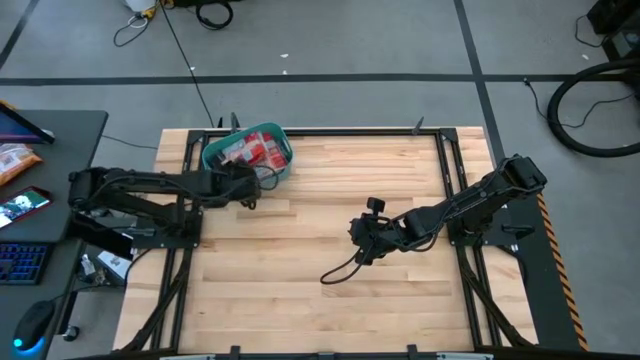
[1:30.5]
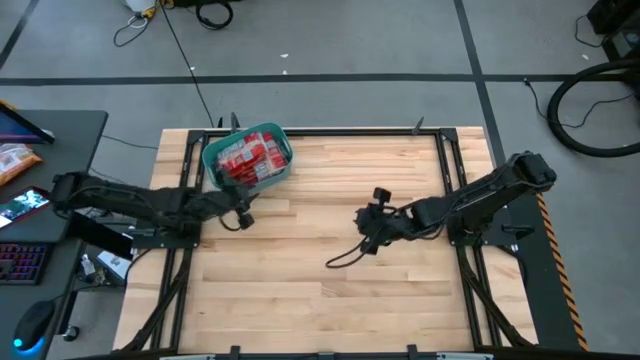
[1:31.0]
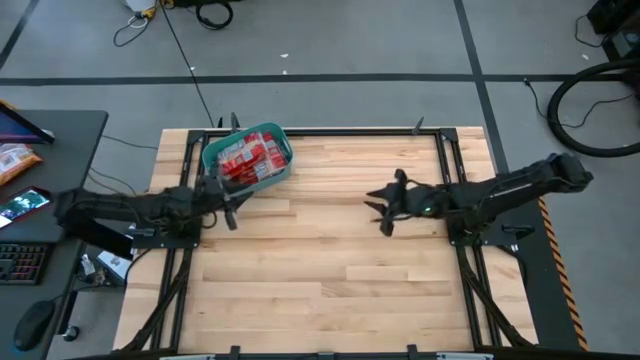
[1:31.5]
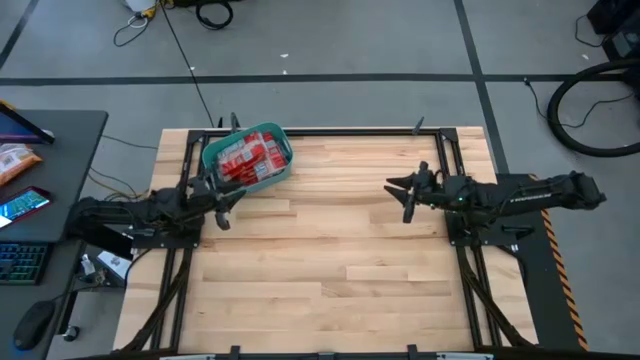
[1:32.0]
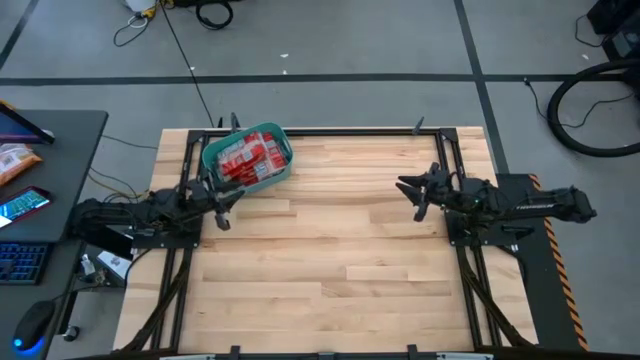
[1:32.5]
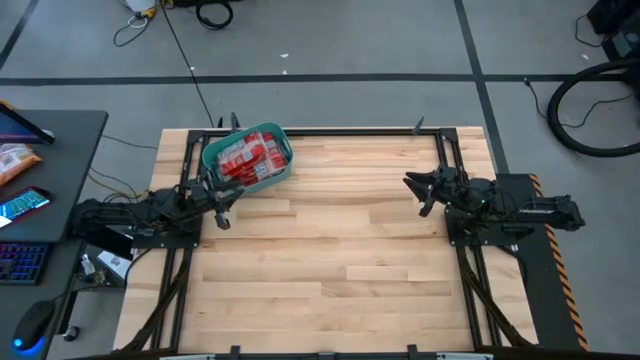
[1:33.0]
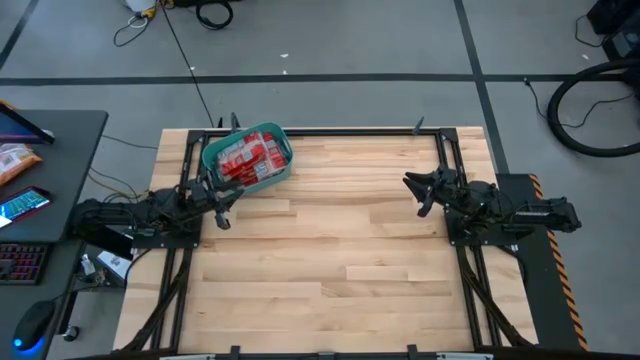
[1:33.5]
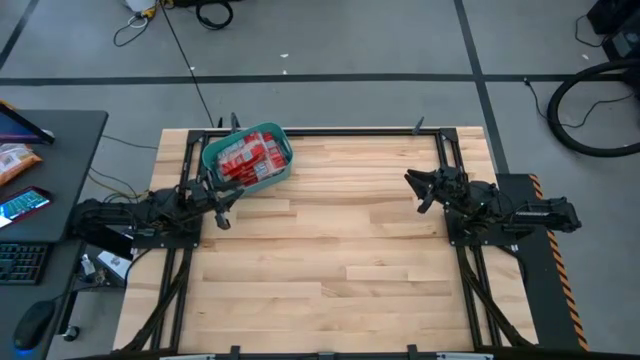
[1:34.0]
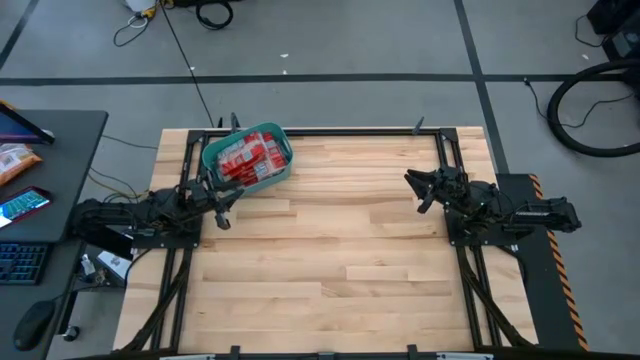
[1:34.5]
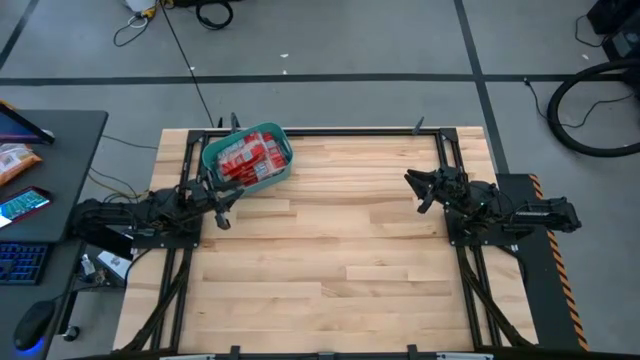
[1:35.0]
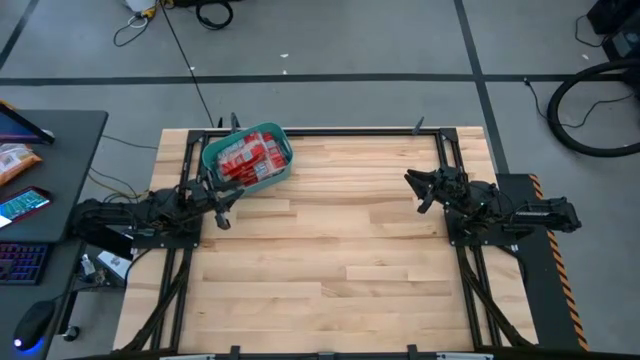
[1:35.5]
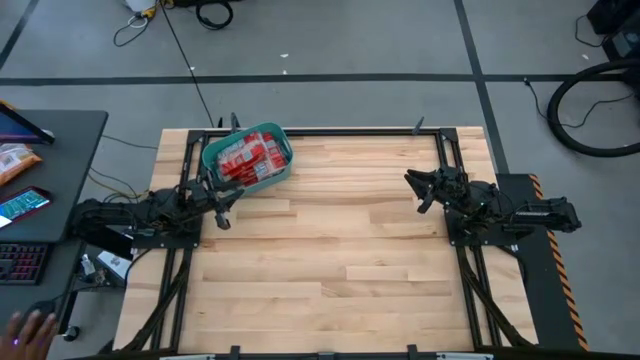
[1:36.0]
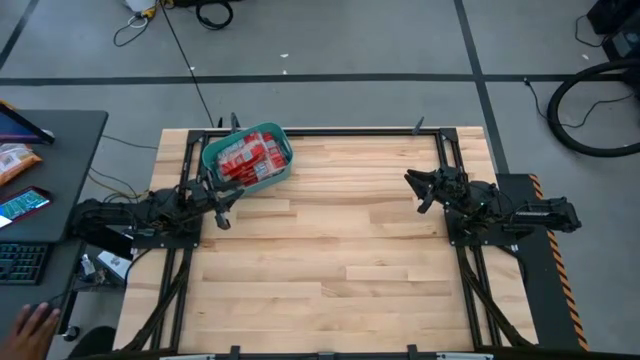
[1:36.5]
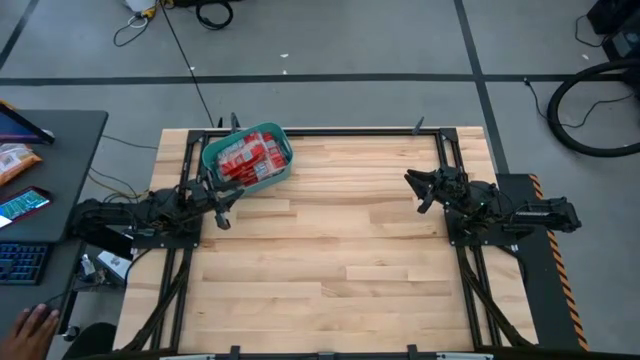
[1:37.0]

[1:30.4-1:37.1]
Task: Sort popcorn bags into baskets
Return to Home Position

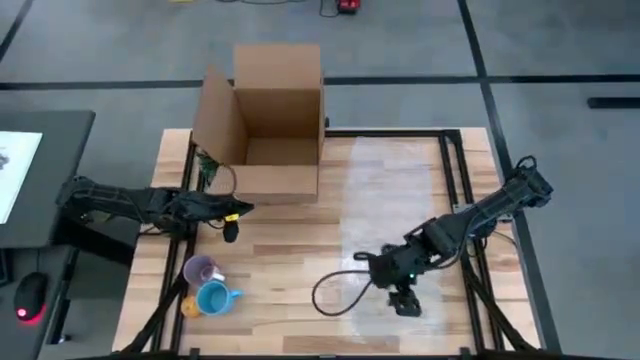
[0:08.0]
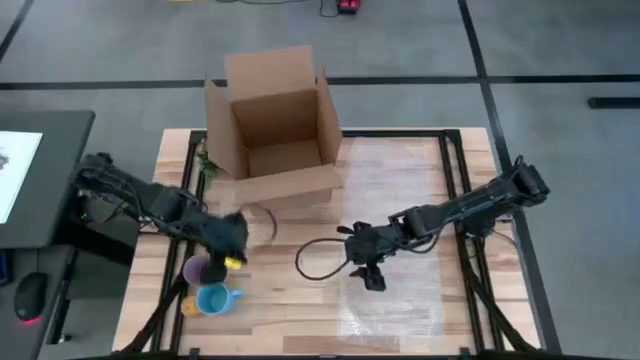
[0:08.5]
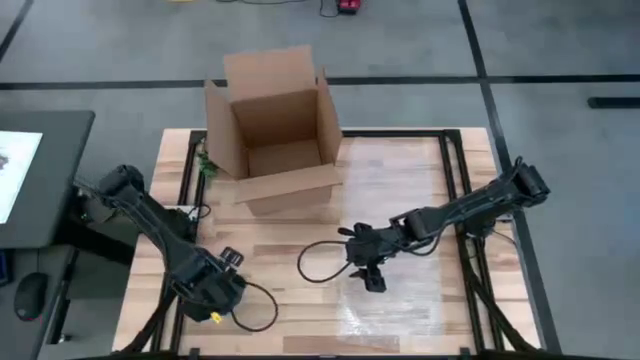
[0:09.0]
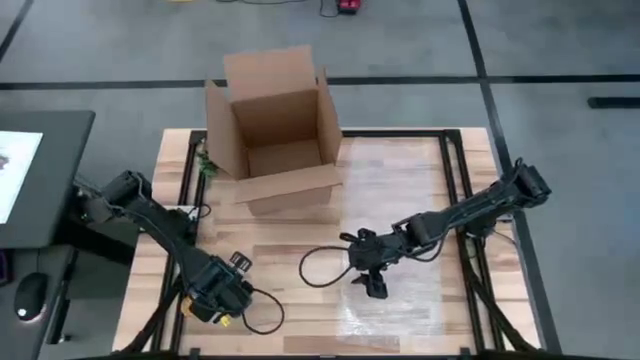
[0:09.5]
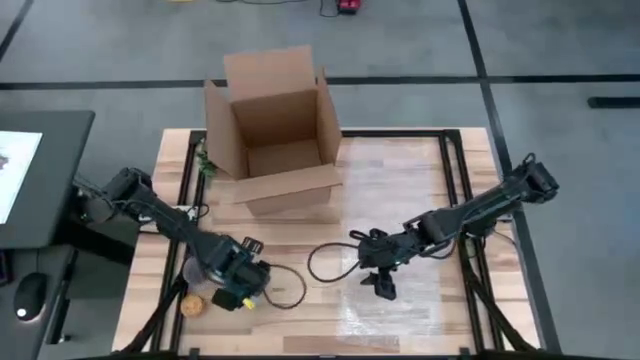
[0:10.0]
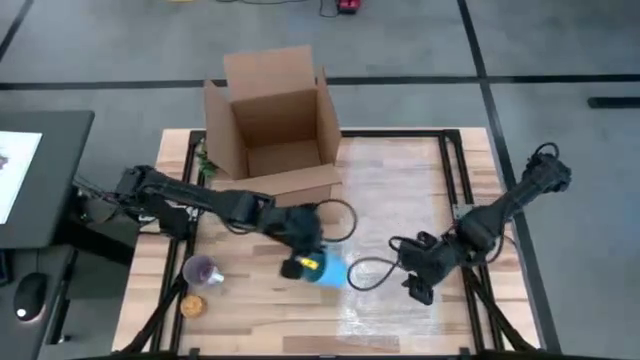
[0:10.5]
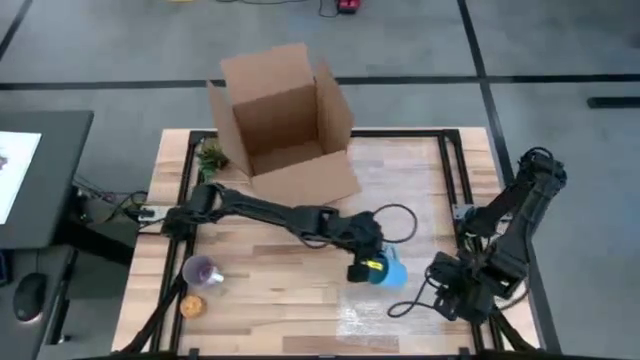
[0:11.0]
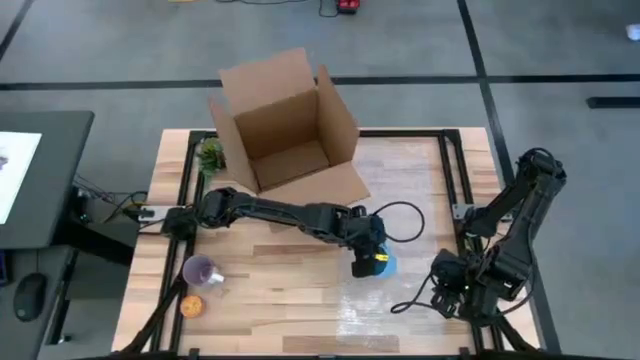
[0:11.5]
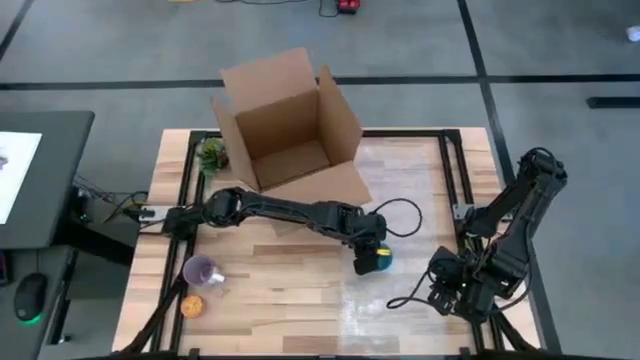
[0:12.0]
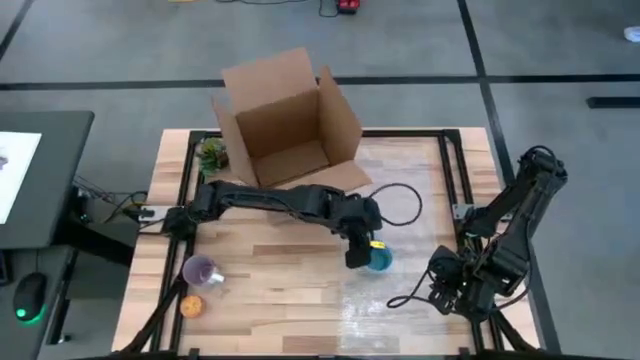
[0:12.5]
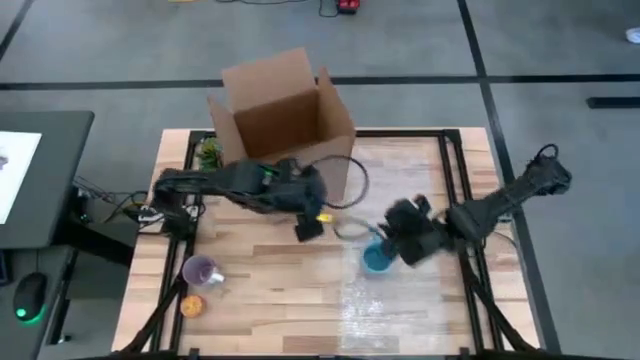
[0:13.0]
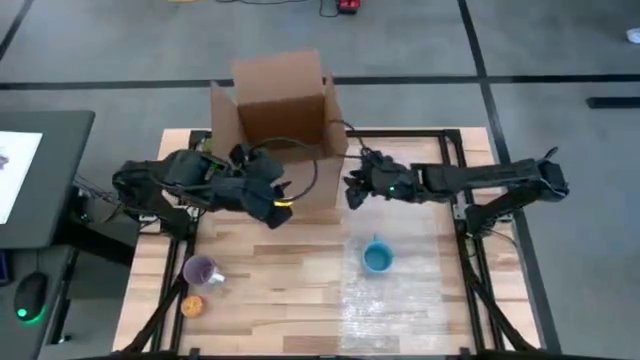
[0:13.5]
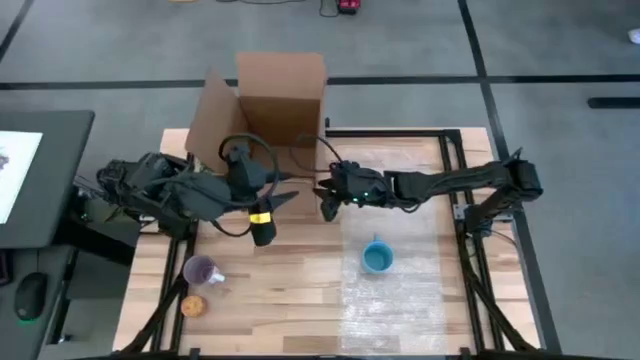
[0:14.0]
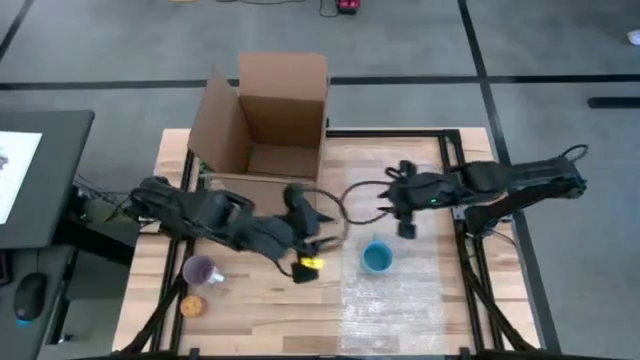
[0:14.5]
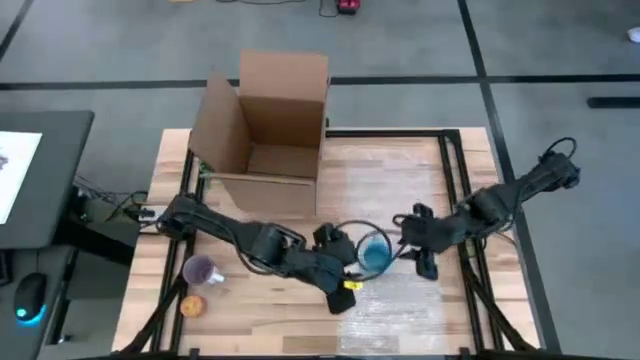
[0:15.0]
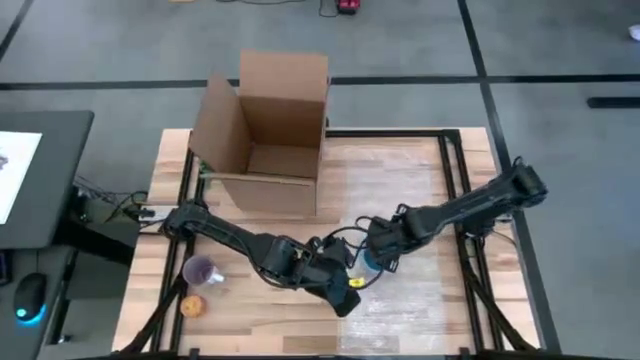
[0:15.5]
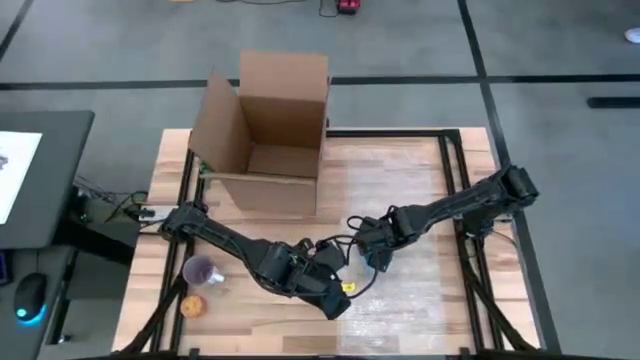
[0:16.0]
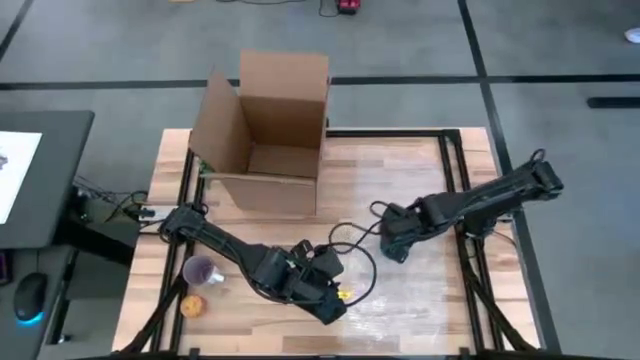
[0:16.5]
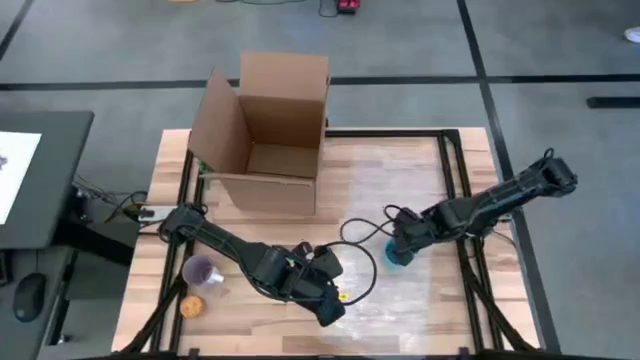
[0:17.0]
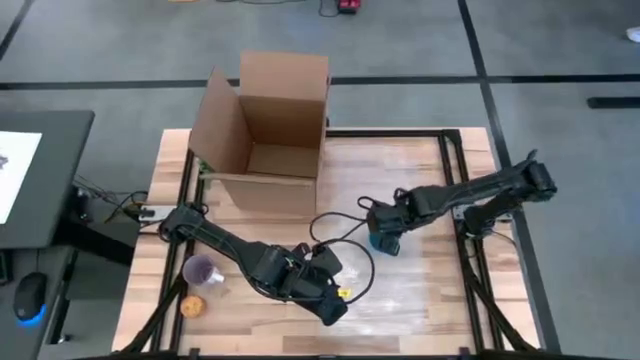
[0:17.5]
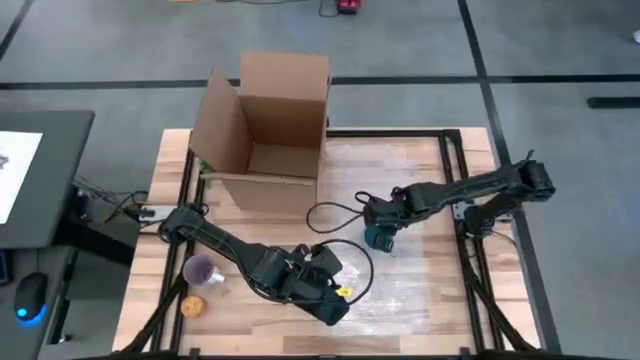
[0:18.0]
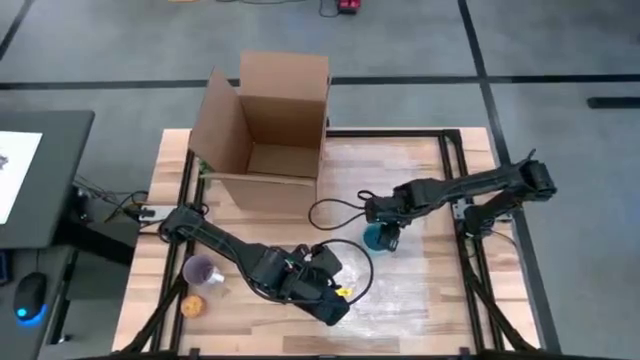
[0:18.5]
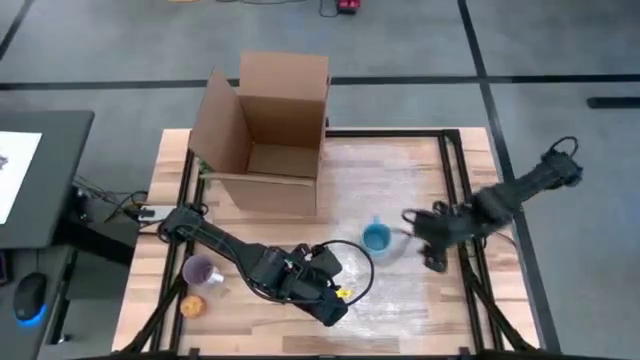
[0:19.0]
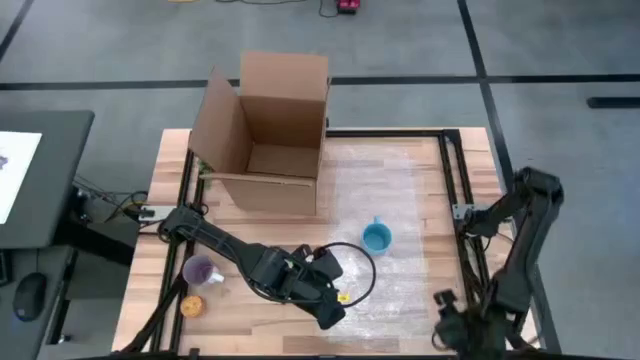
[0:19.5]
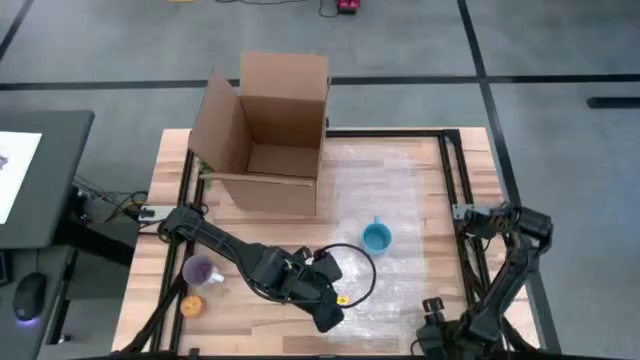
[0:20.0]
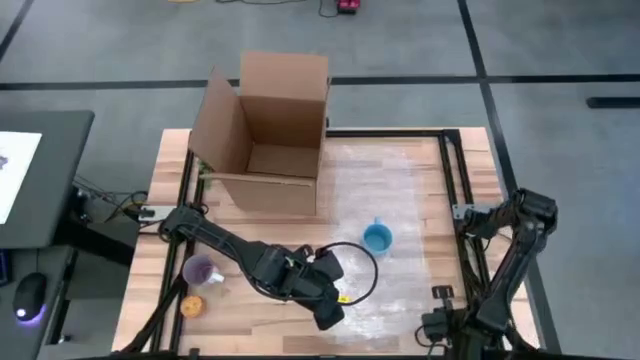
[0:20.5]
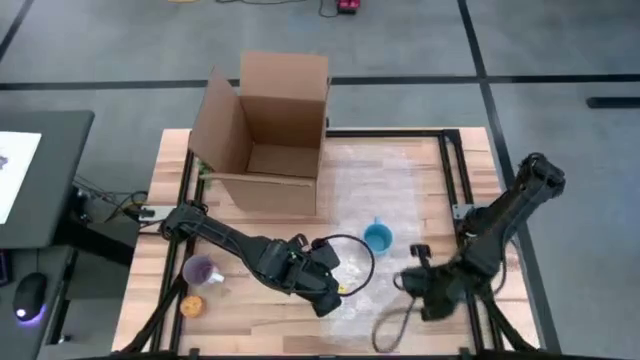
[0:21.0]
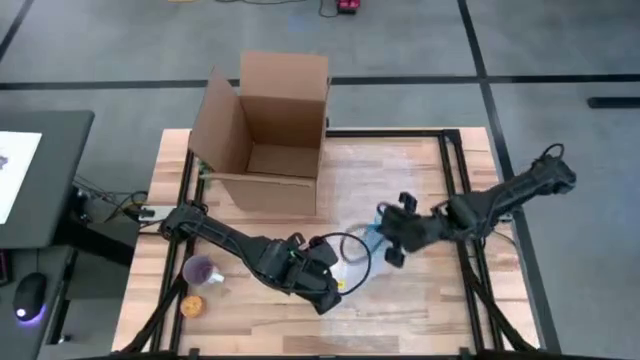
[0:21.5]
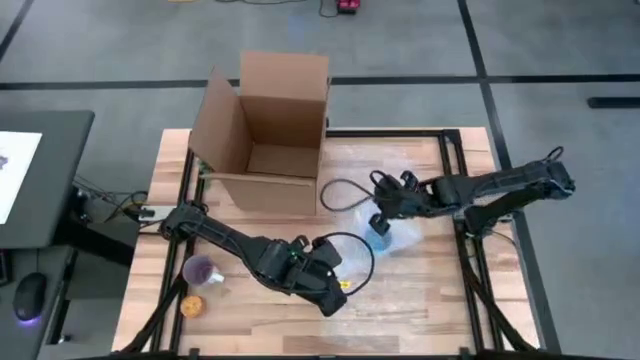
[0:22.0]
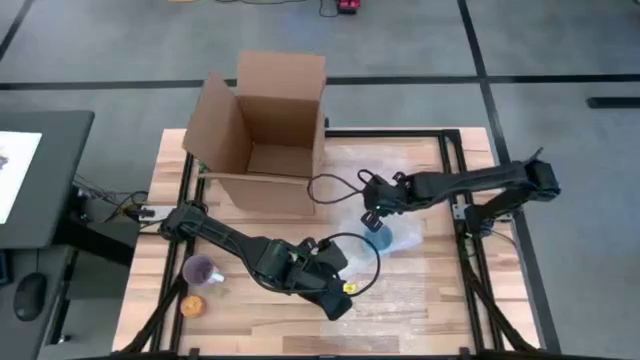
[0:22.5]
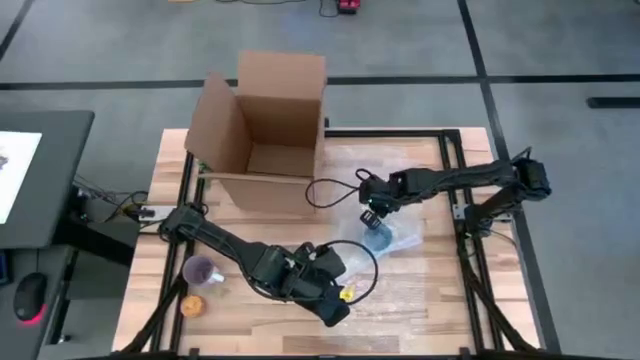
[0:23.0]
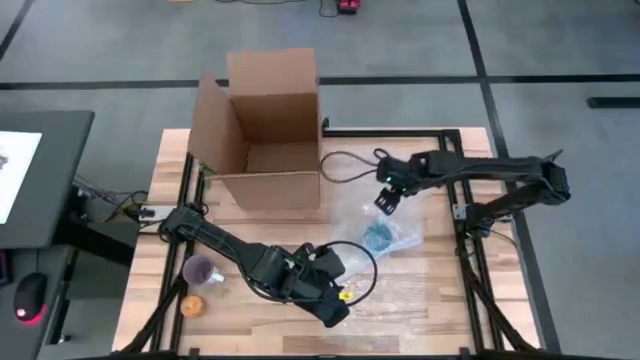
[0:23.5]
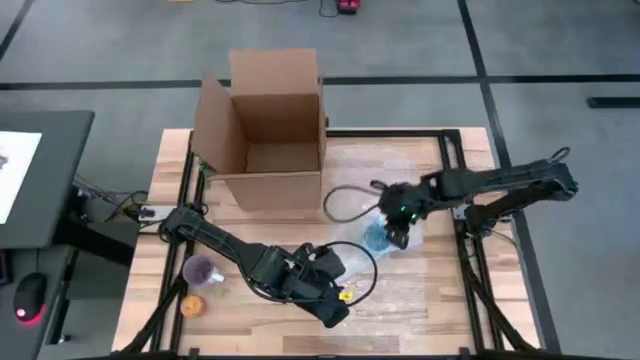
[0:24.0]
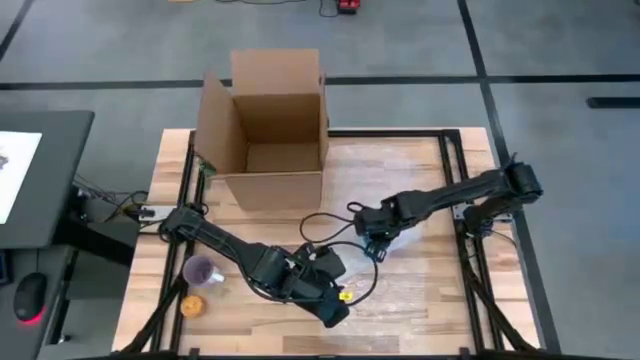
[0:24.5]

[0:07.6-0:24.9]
Task: wrap mug
Wrap the blue mug with the bubble wrap
